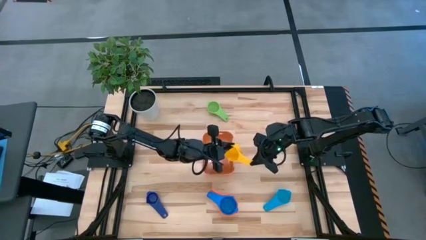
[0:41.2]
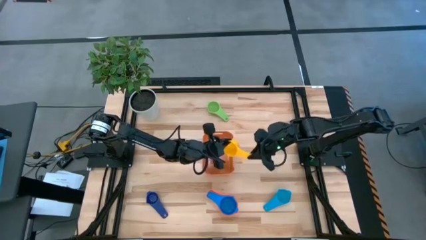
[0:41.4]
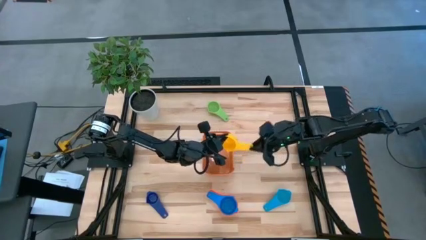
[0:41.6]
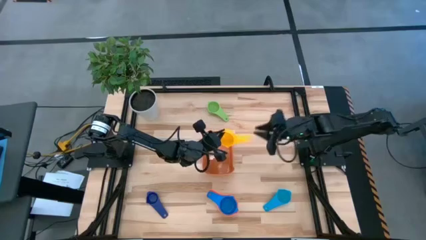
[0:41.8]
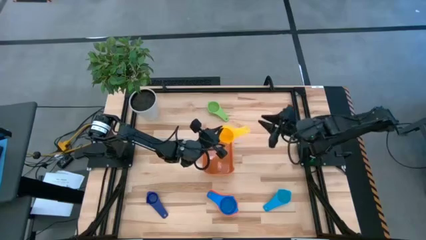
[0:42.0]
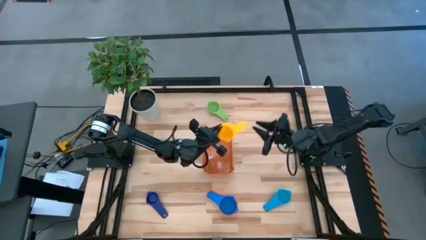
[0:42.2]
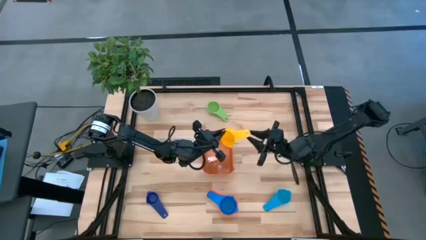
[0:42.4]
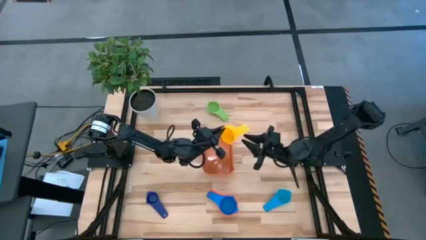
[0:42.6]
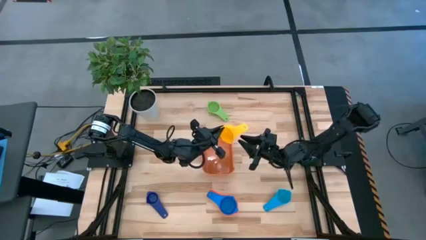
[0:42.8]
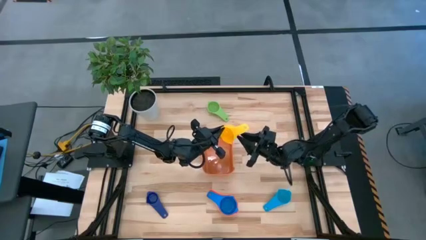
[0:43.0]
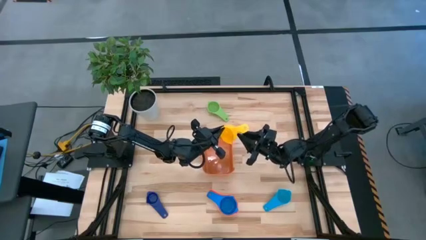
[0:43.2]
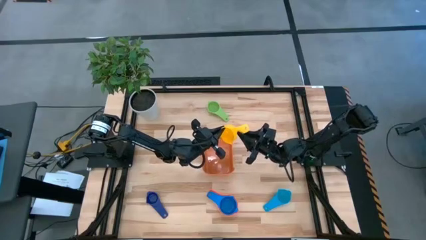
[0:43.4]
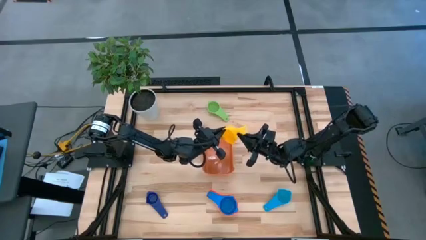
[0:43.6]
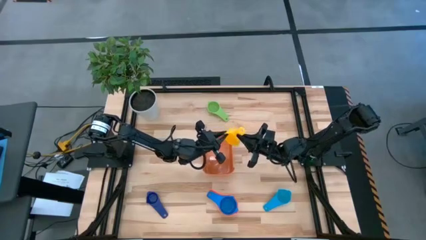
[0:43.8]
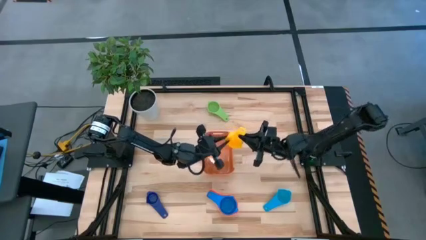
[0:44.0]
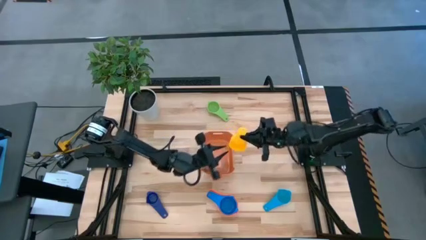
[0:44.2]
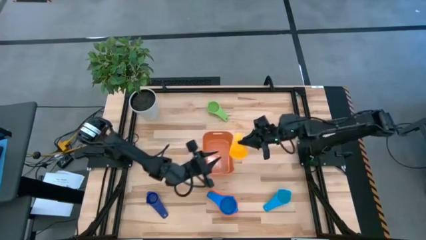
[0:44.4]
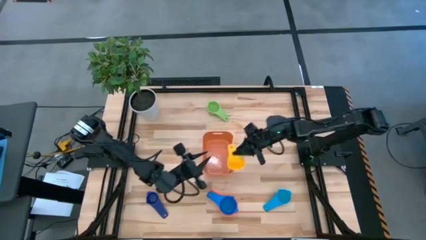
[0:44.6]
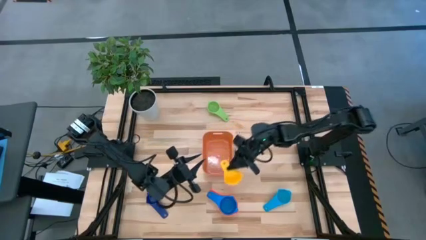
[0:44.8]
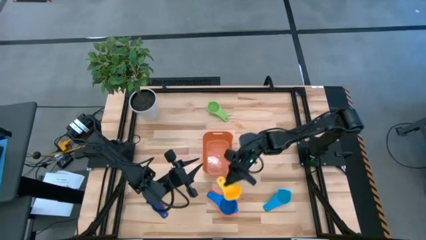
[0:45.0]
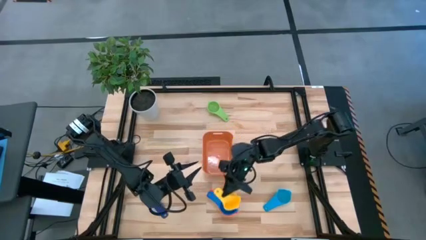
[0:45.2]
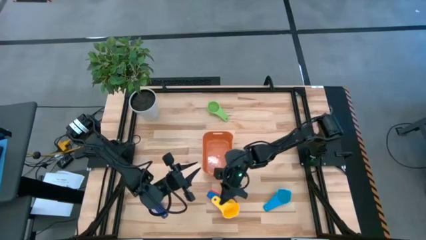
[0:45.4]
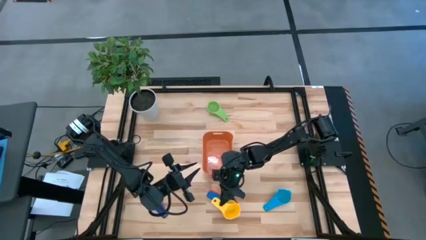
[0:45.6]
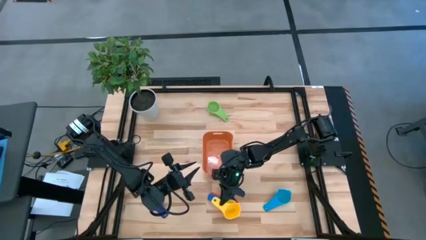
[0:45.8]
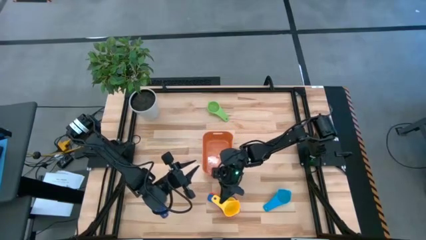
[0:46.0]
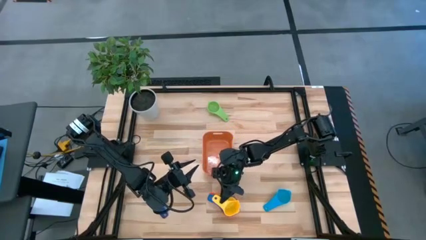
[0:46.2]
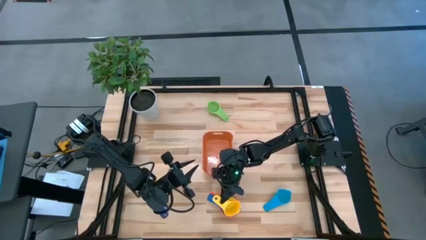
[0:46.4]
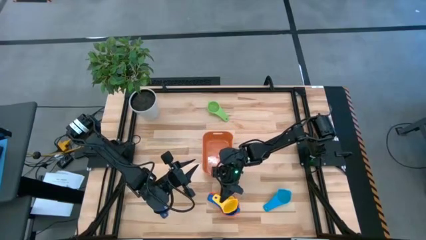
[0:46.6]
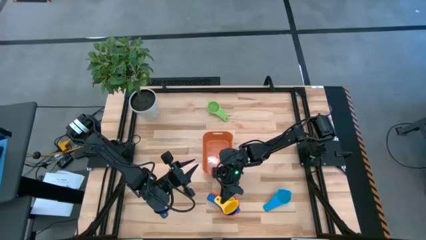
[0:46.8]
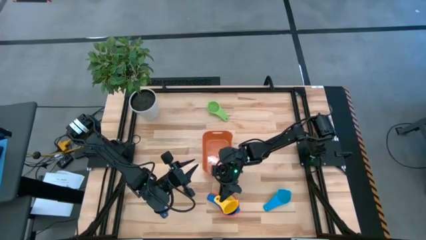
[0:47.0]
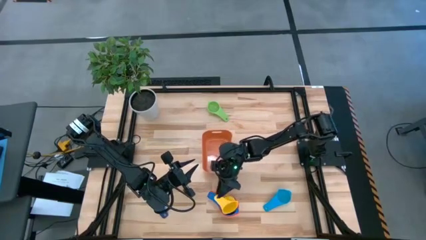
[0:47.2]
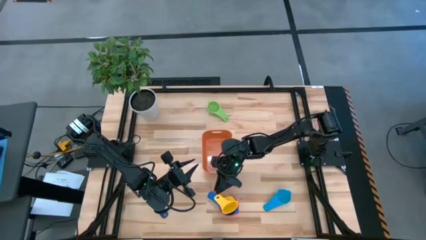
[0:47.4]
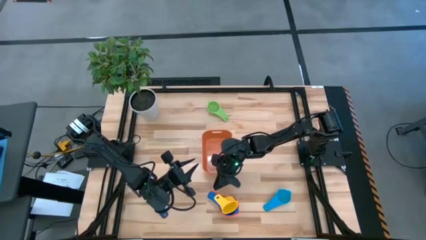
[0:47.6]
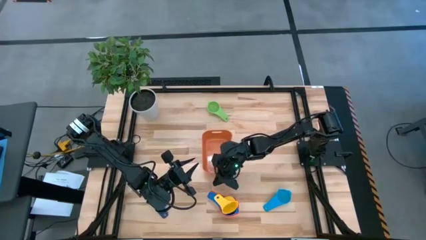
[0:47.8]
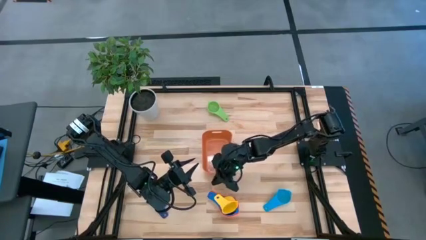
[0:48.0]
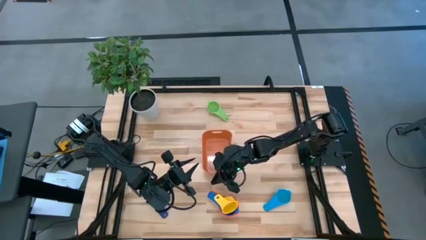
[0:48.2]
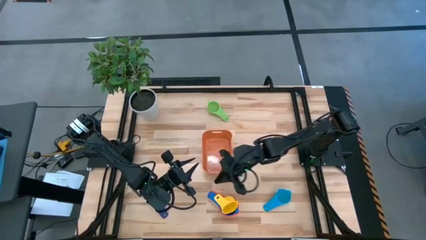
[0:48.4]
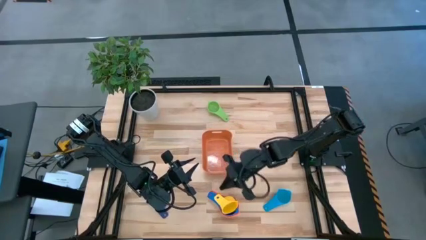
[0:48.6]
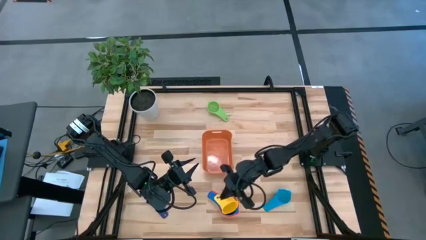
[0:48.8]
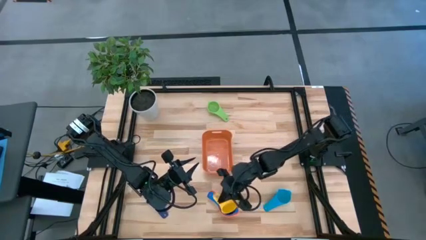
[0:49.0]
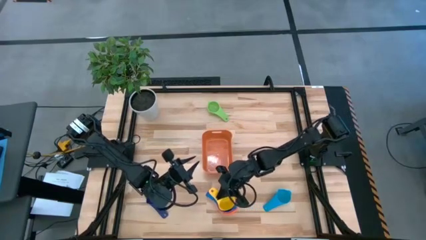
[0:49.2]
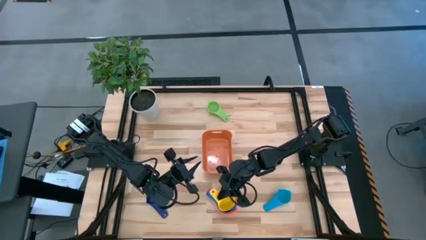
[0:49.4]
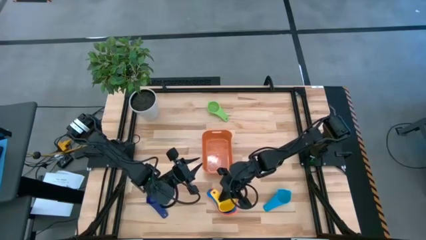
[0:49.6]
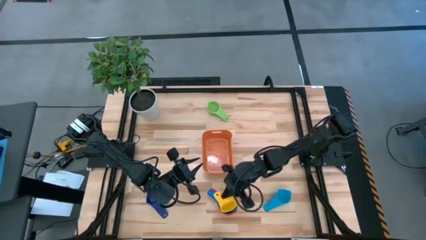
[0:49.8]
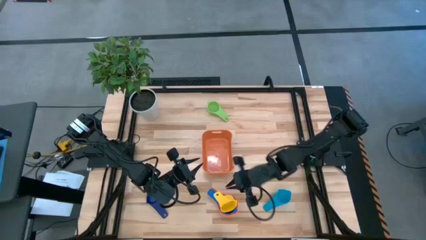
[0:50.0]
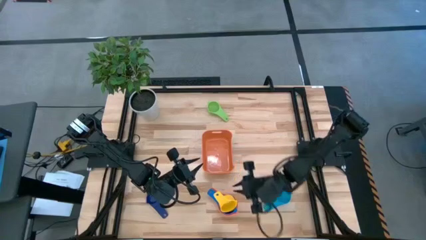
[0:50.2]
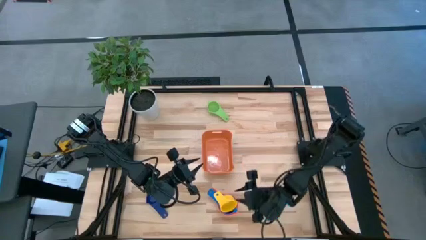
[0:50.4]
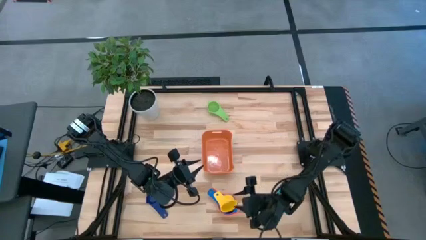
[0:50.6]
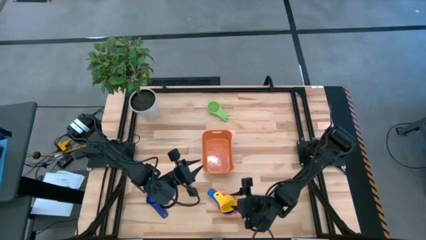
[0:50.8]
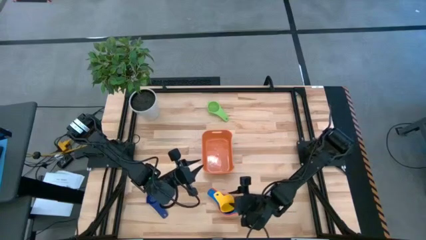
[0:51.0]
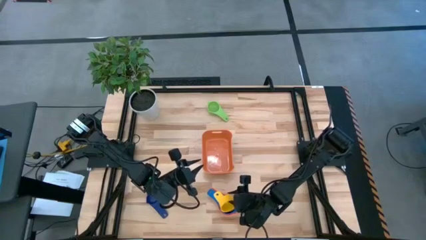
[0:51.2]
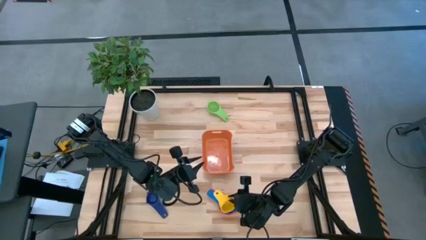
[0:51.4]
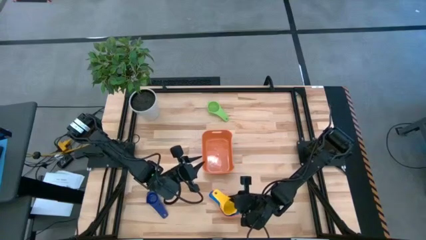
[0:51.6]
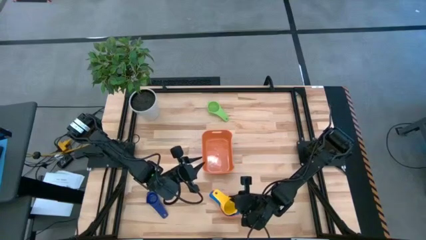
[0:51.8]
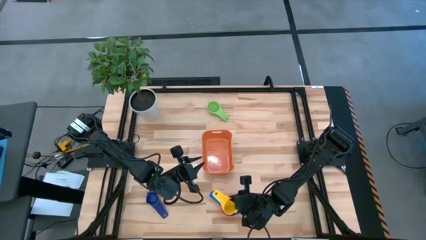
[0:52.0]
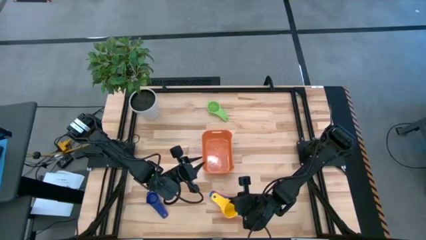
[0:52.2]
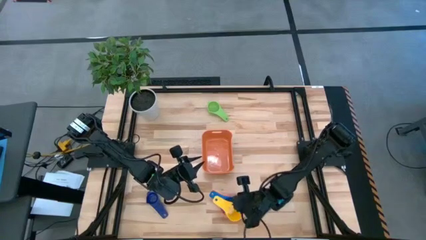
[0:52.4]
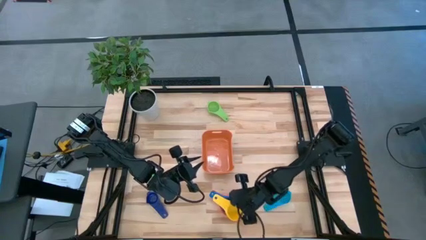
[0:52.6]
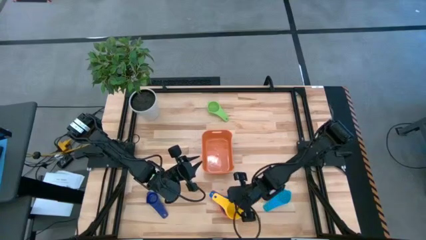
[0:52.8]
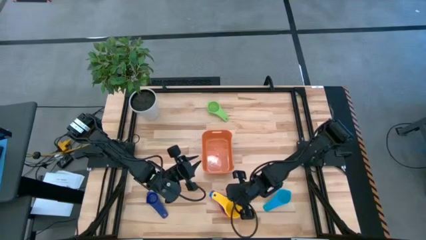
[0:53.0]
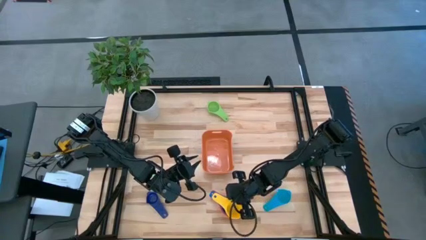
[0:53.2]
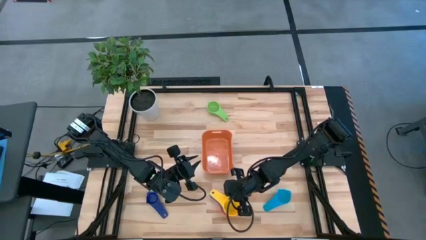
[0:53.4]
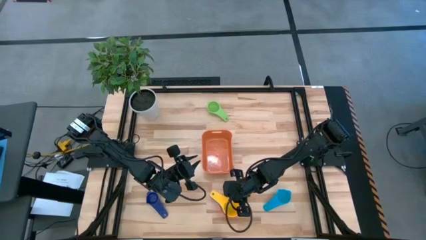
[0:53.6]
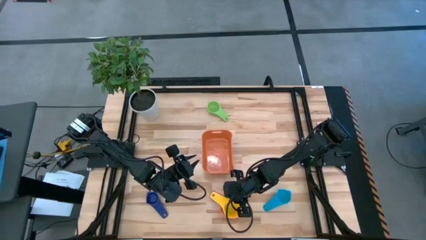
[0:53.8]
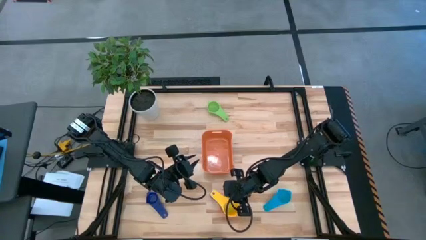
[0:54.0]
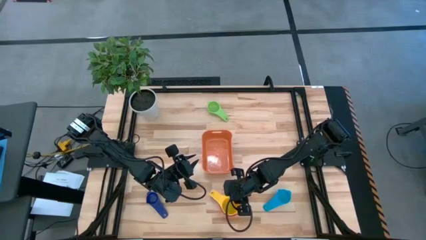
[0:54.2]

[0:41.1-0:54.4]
Task: Nest measuring cups in basket
Stack the yellow measuring cup on top of the blue measuring cup

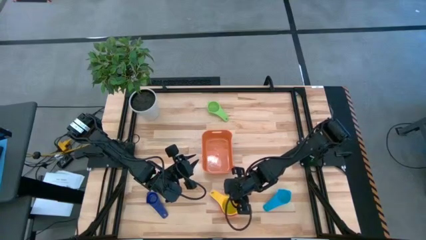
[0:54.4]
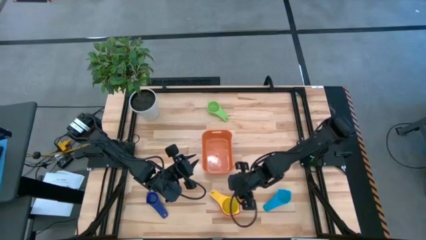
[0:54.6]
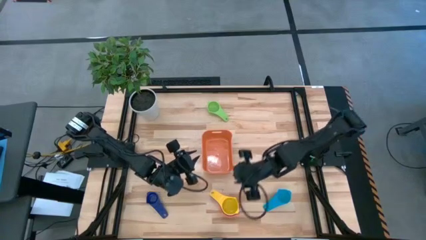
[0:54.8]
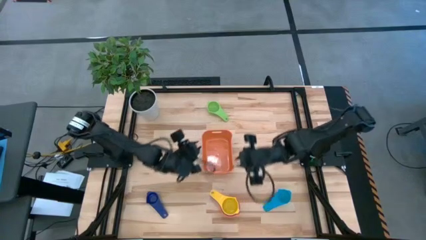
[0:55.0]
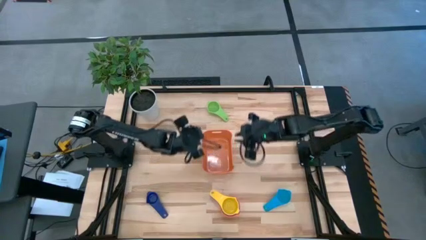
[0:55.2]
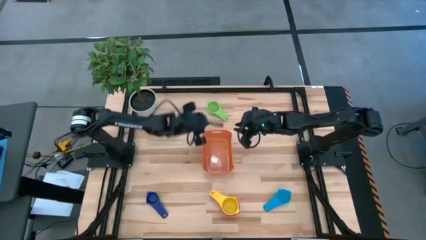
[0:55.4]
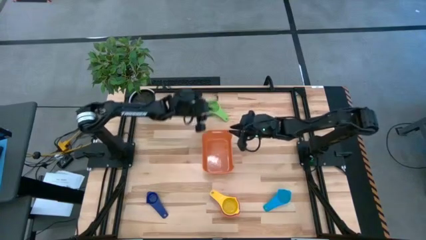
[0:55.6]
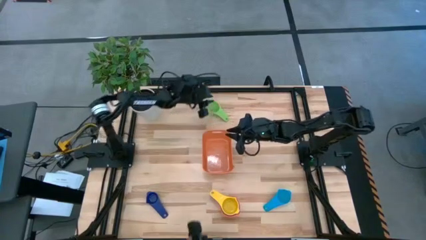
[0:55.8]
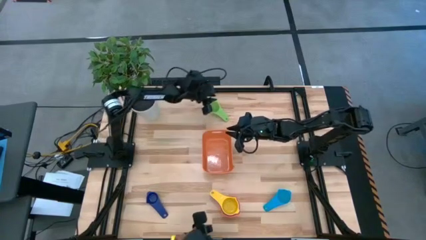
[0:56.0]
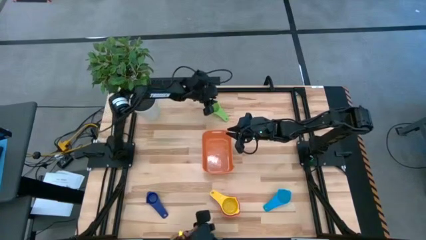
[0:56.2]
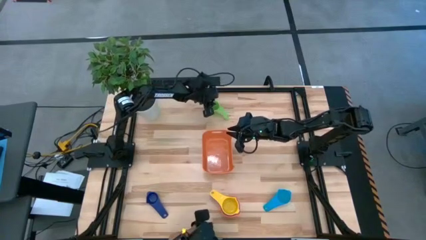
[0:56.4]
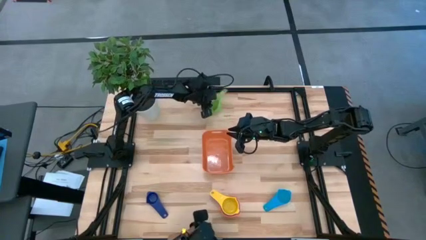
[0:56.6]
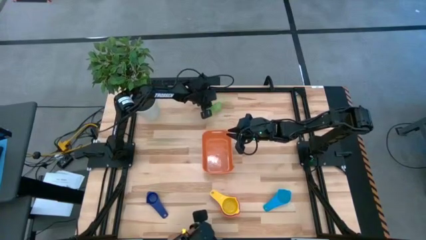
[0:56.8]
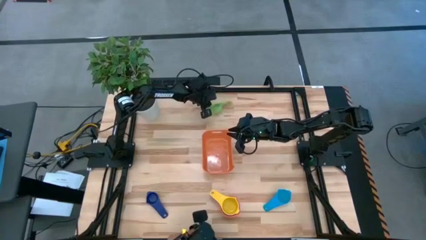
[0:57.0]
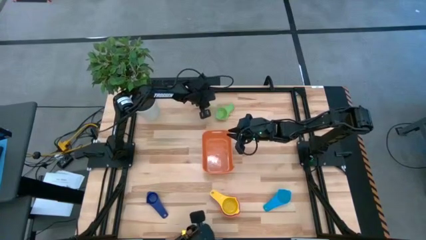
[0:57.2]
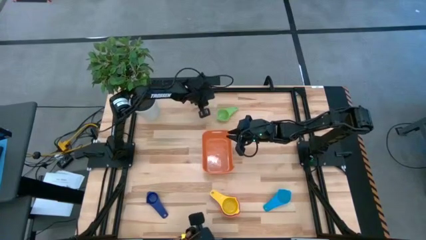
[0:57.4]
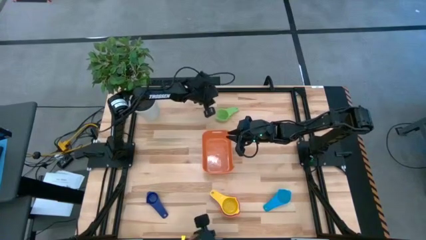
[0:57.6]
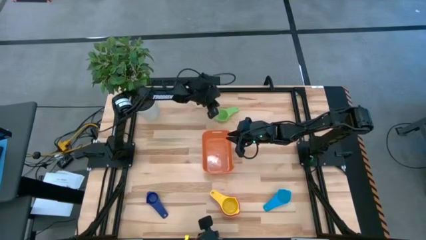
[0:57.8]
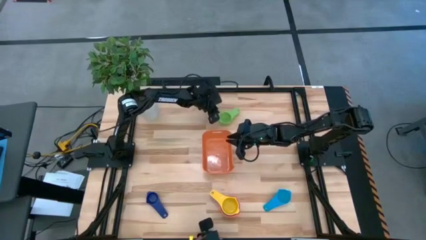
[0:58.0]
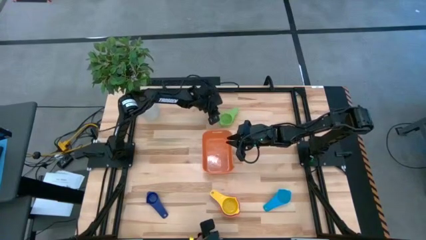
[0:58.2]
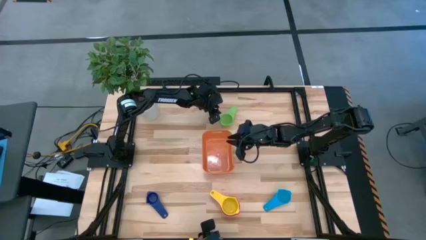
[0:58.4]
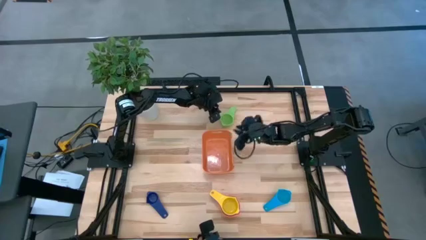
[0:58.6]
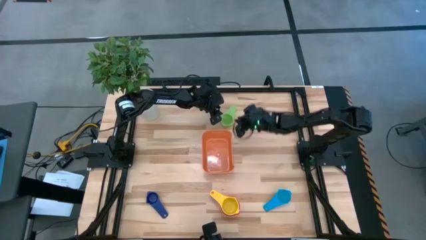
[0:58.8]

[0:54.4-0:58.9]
Stack the green measuring cup on top of the yellow measuring cup
